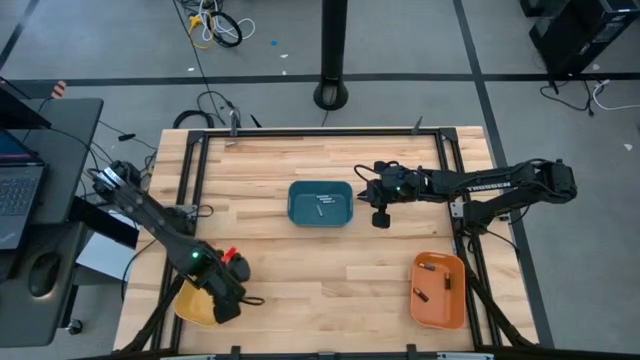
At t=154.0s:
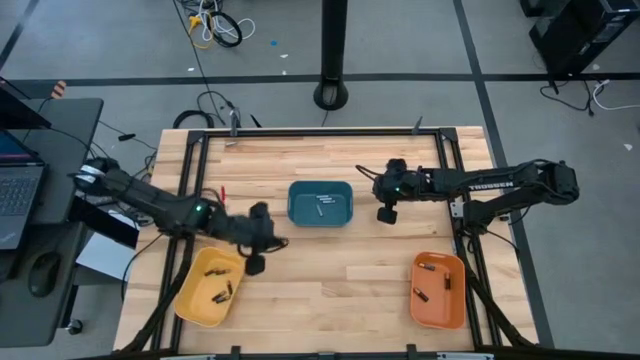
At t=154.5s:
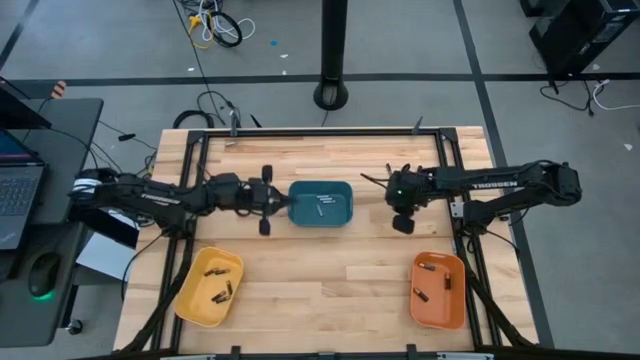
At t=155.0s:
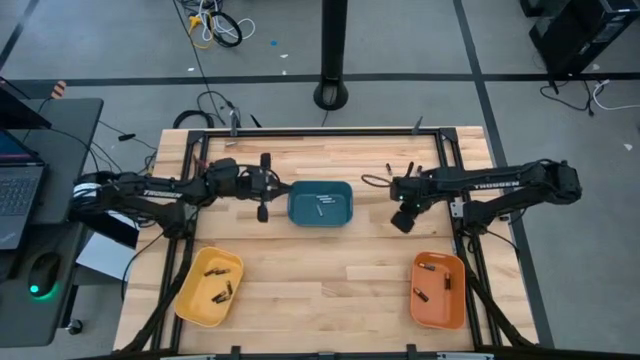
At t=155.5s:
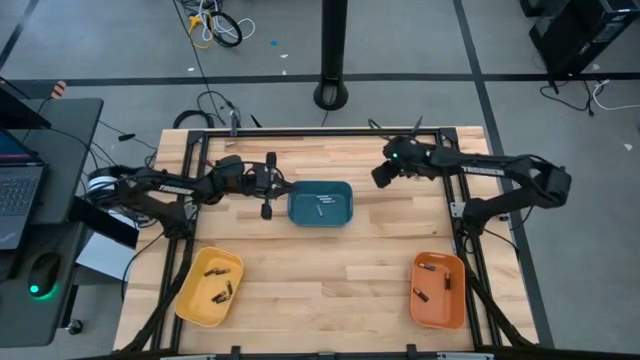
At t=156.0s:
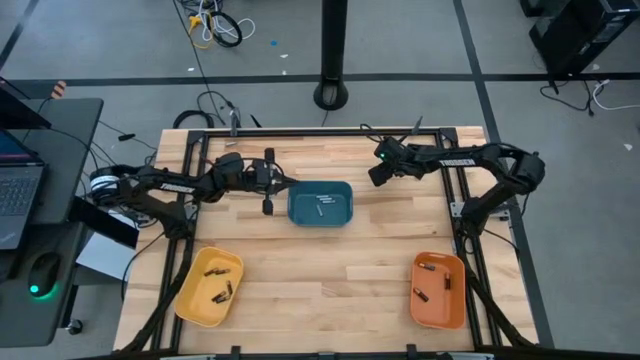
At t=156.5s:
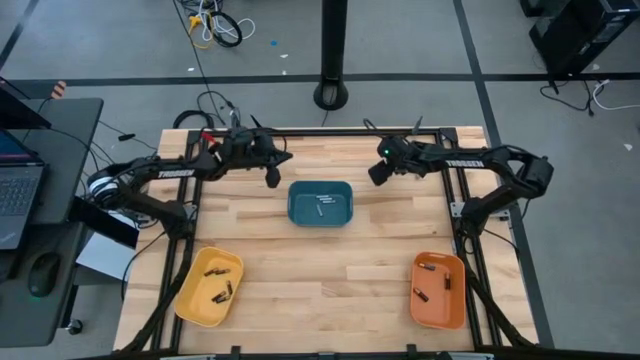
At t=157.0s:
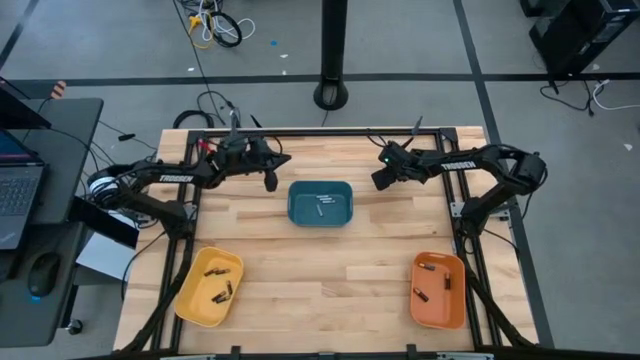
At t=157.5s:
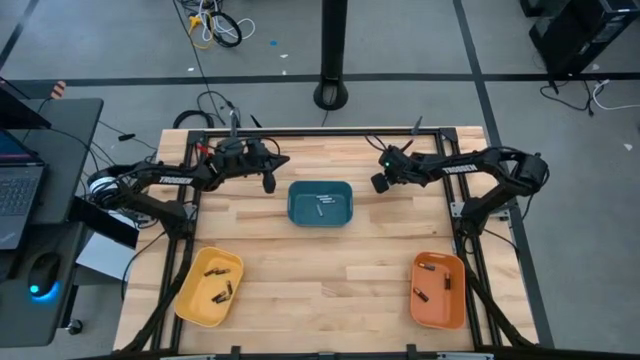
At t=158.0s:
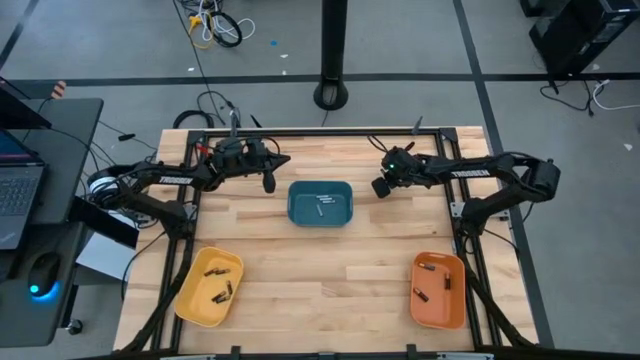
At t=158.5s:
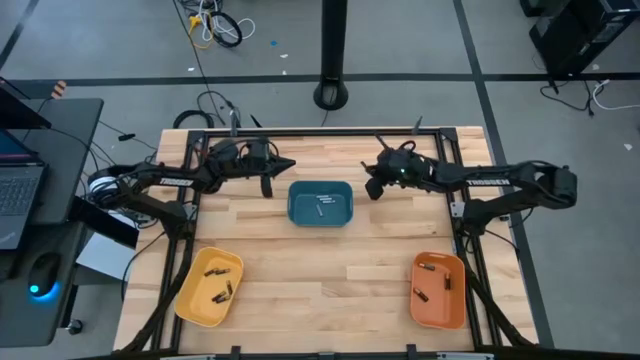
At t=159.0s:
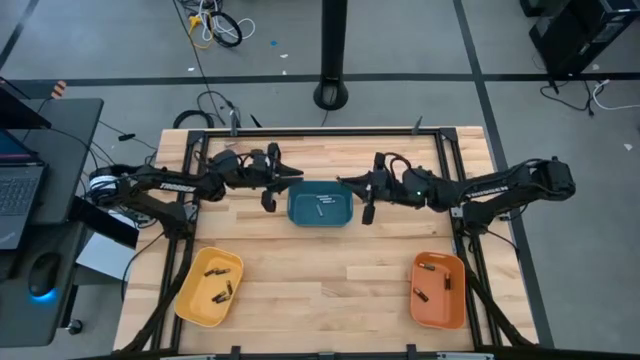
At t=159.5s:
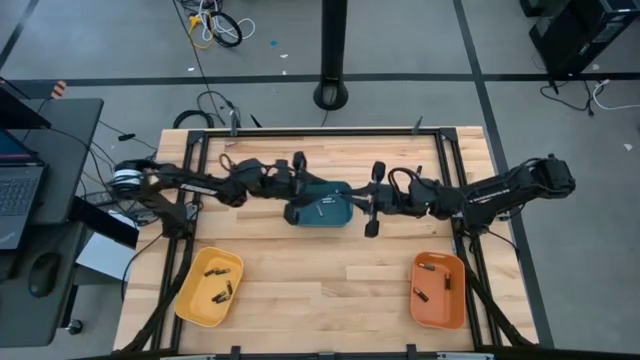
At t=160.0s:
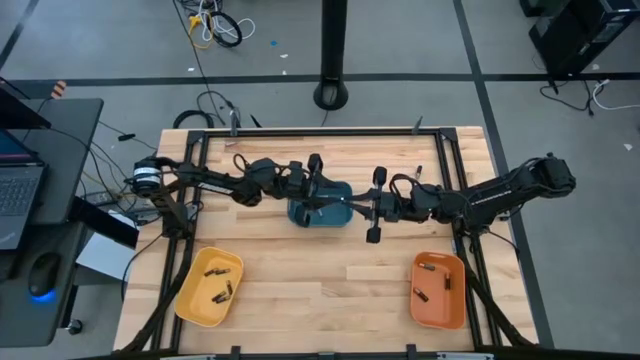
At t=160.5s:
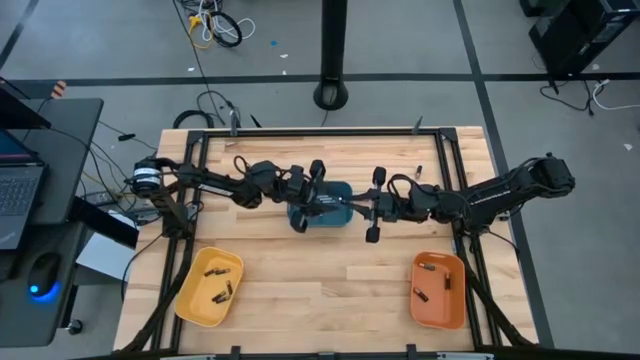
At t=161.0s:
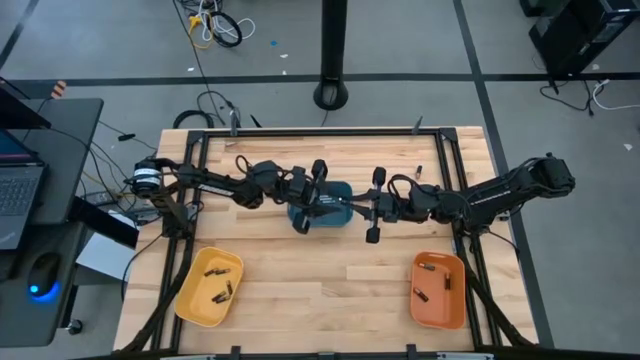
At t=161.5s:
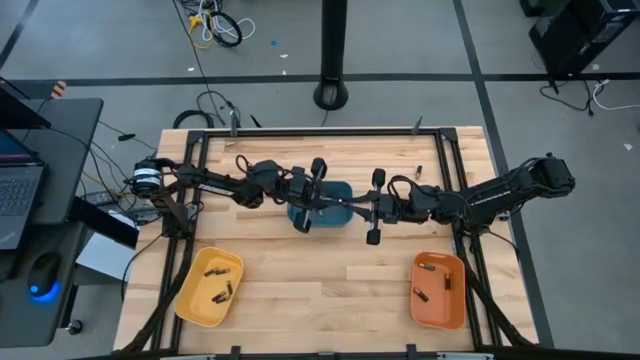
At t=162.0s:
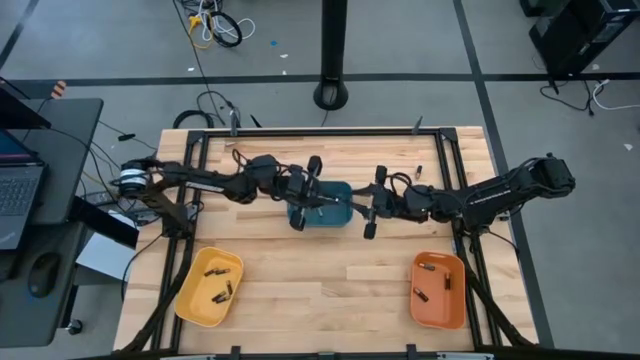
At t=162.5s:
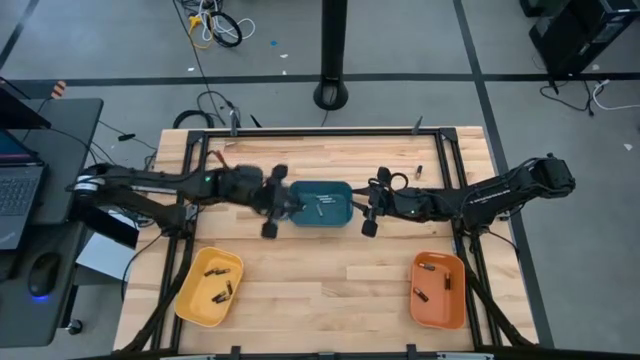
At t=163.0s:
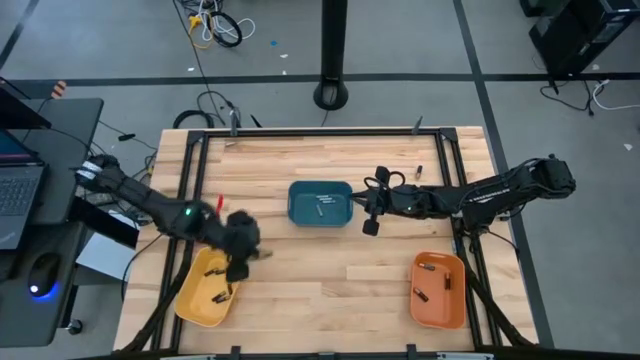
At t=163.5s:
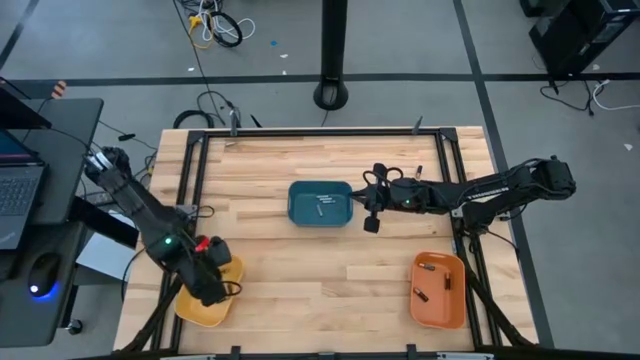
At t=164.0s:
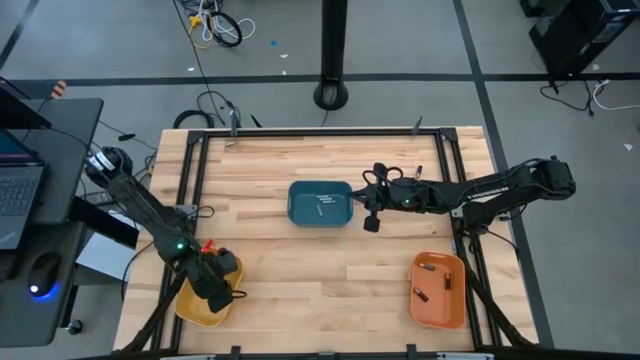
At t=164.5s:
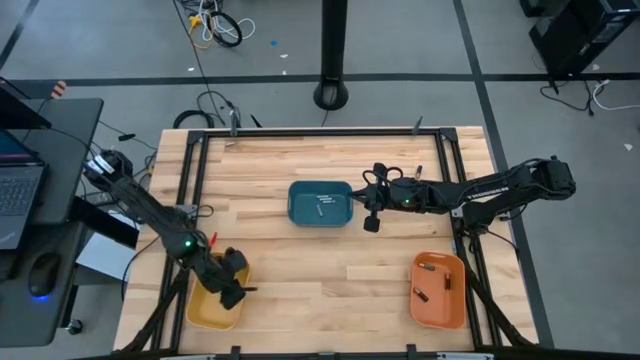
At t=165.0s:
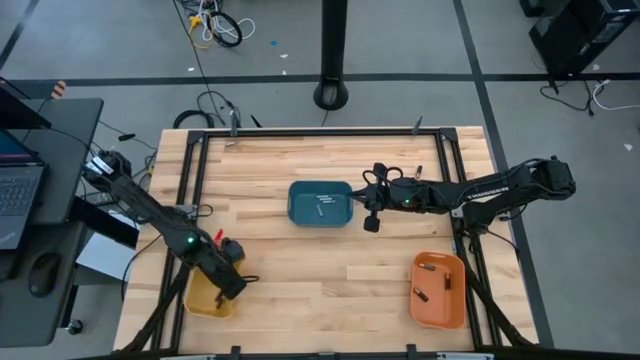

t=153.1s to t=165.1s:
Task: Sort batteries
Put the black battery into the yellow bin

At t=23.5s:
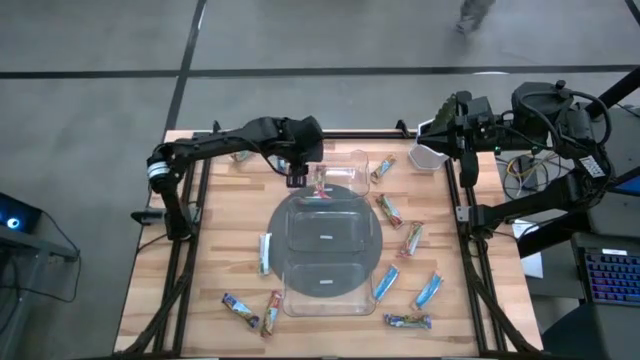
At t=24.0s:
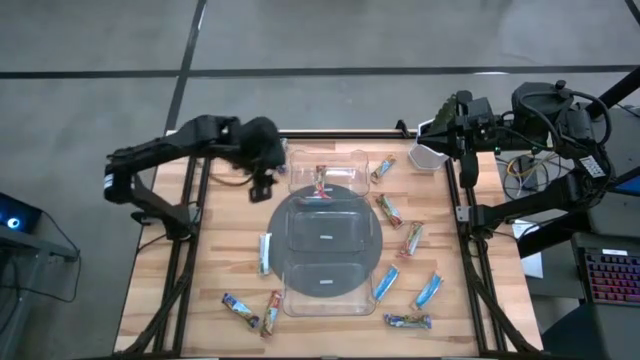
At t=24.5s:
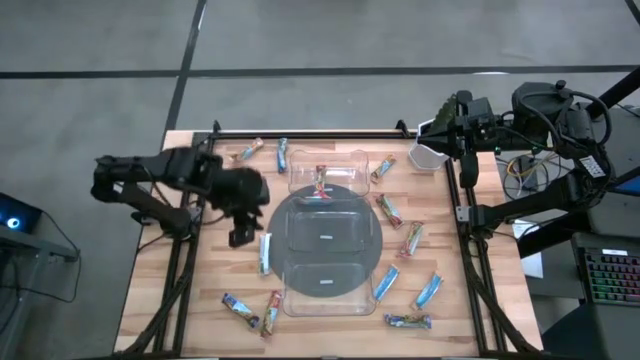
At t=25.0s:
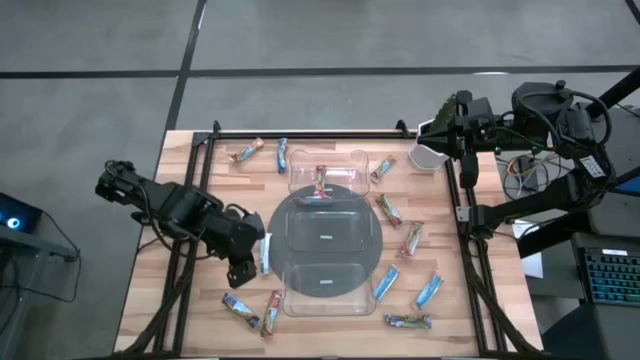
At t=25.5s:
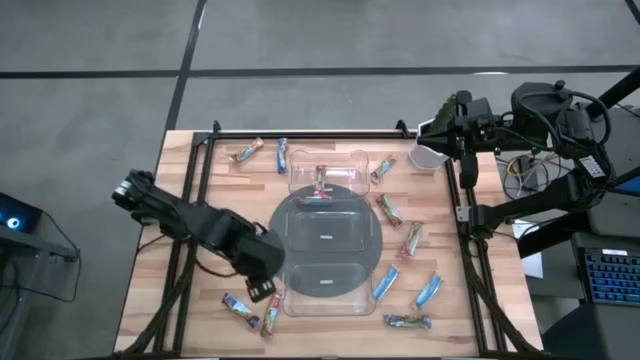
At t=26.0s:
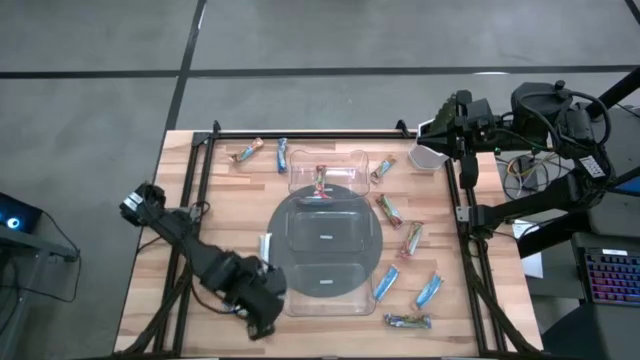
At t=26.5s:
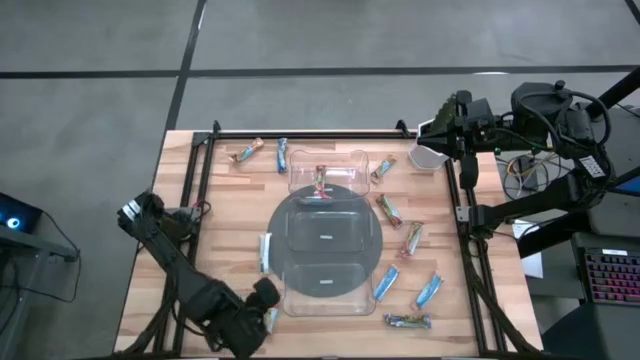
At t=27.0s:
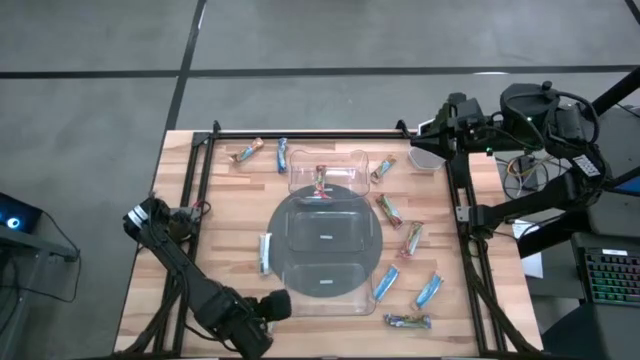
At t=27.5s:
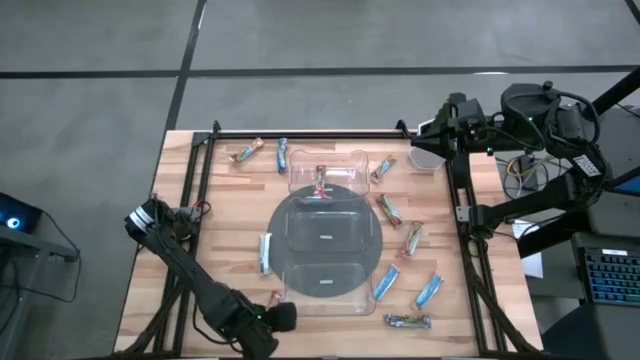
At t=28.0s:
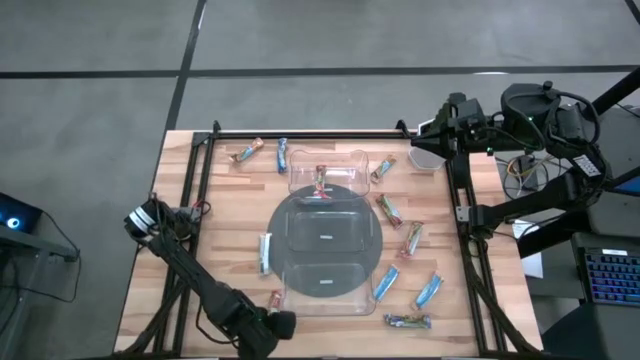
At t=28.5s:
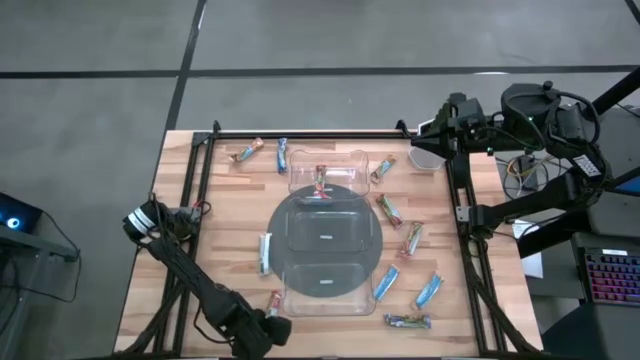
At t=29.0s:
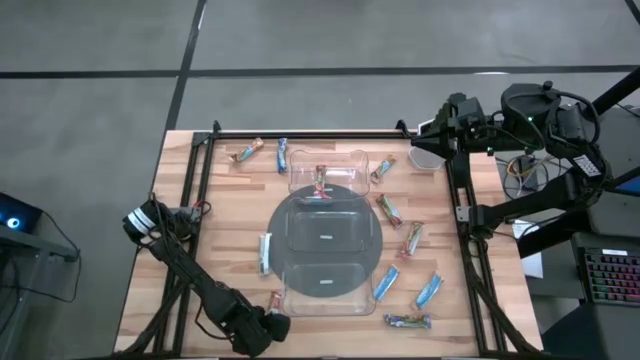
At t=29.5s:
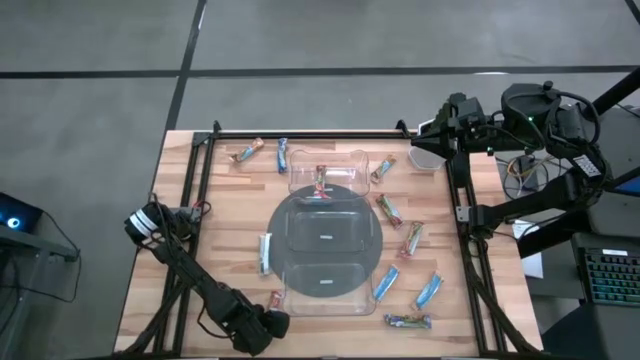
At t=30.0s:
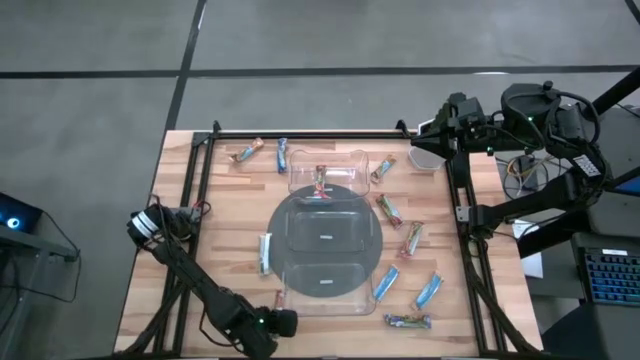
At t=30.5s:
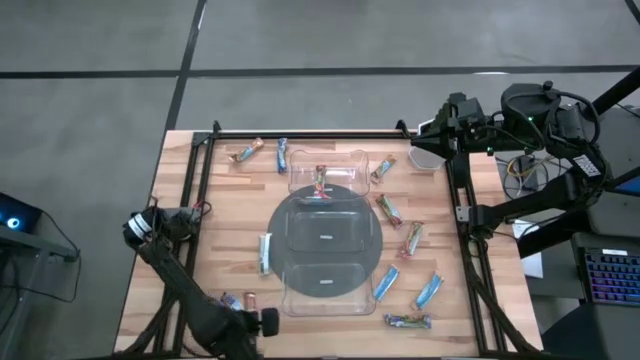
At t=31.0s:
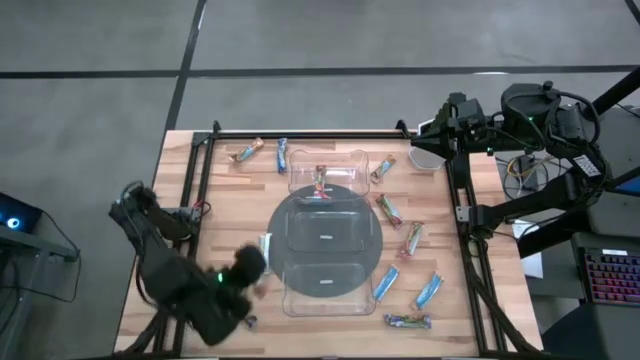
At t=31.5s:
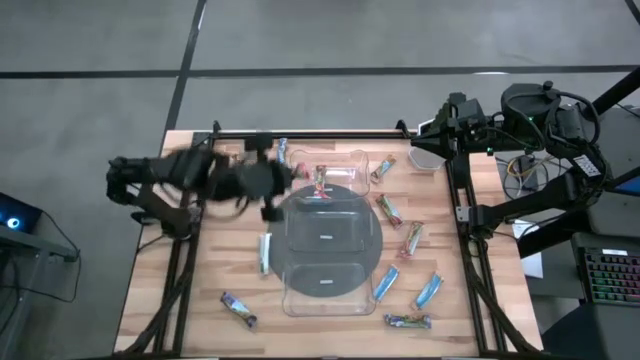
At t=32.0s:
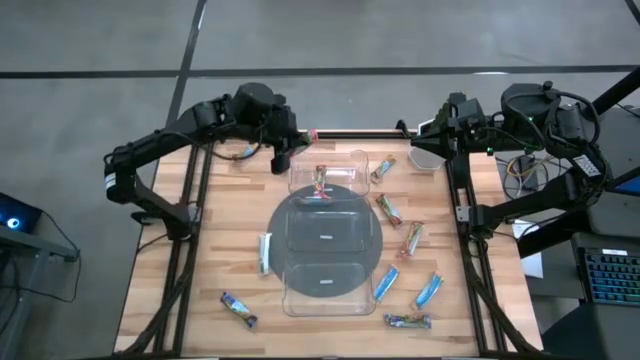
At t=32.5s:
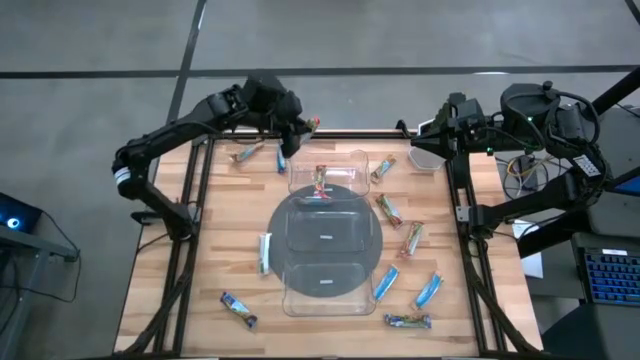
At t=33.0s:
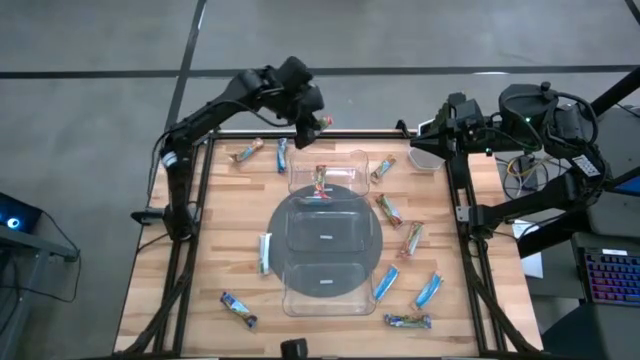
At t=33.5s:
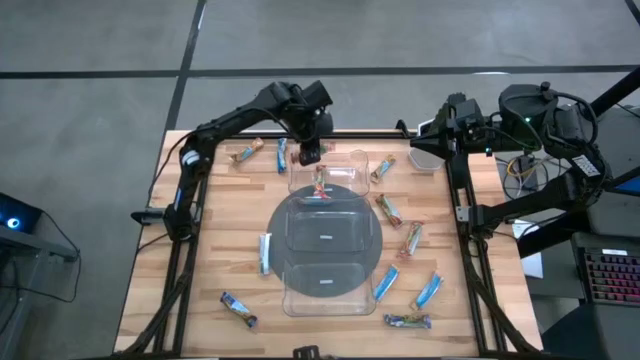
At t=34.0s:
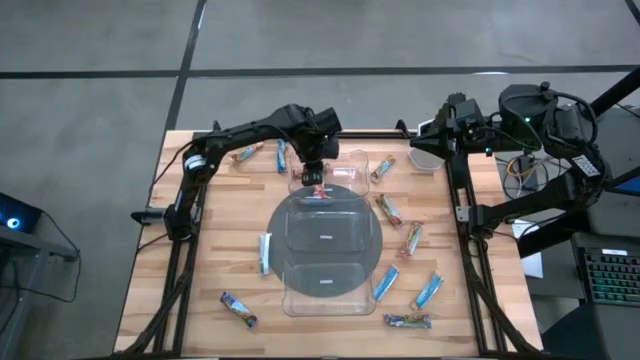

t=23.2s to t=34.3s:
Task: Pick and place Granola Bars by type
Put the red granola bar into the top transparent bin
